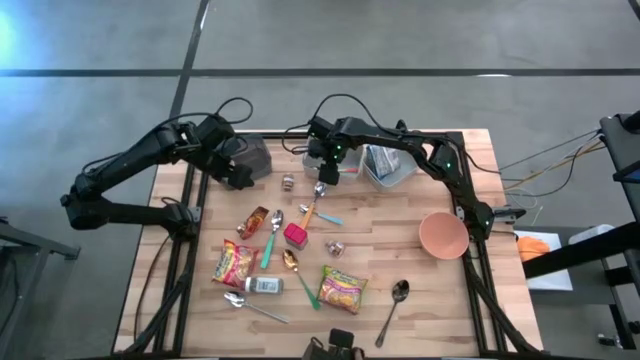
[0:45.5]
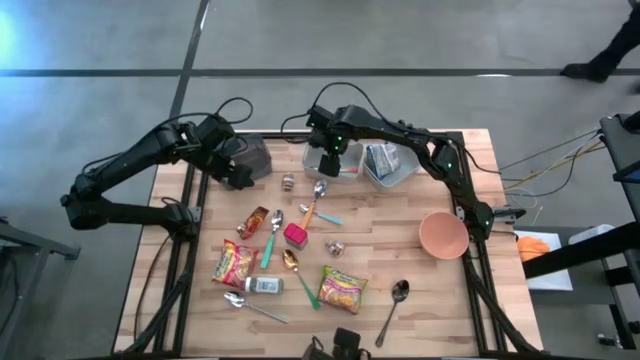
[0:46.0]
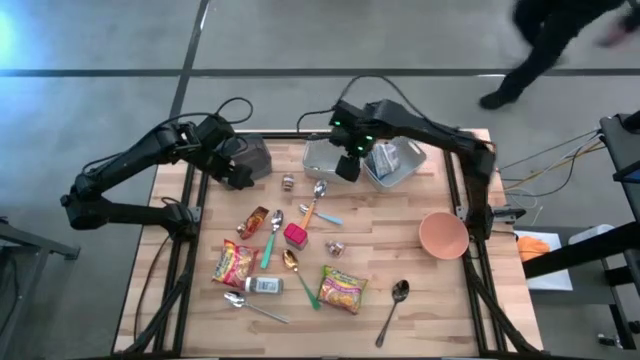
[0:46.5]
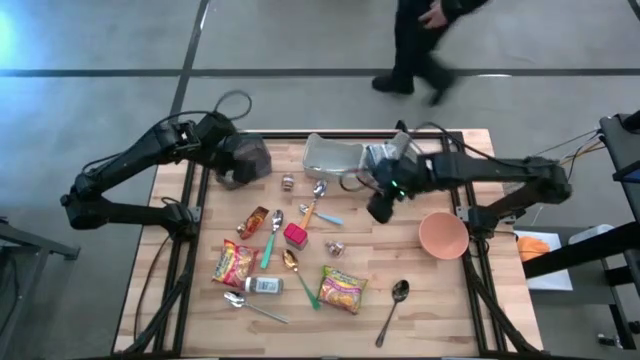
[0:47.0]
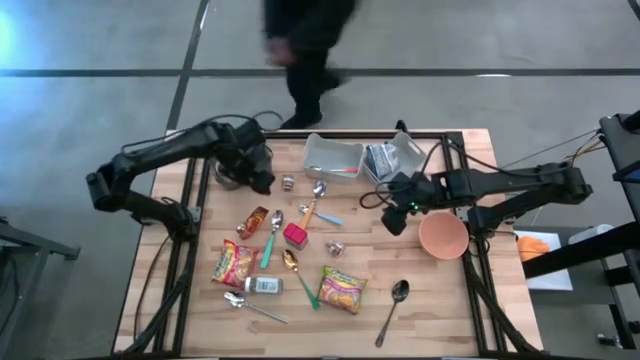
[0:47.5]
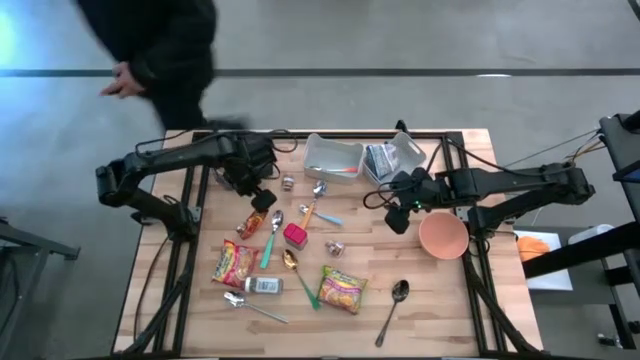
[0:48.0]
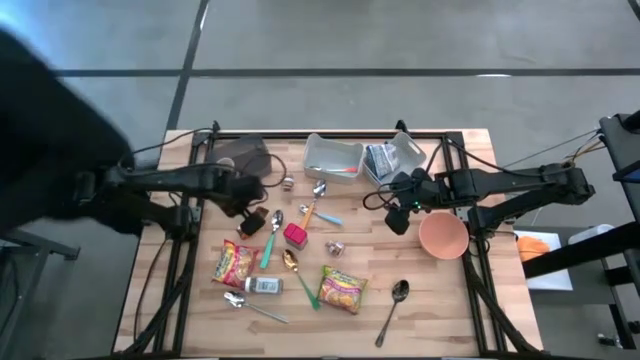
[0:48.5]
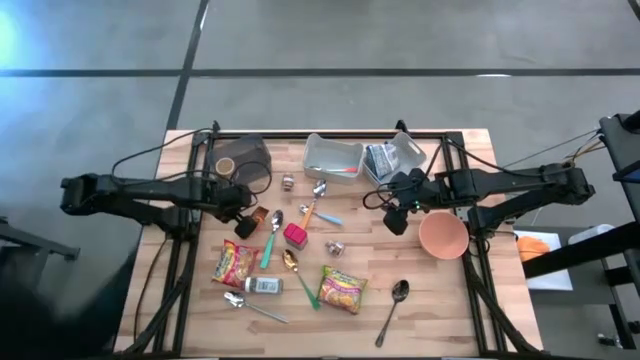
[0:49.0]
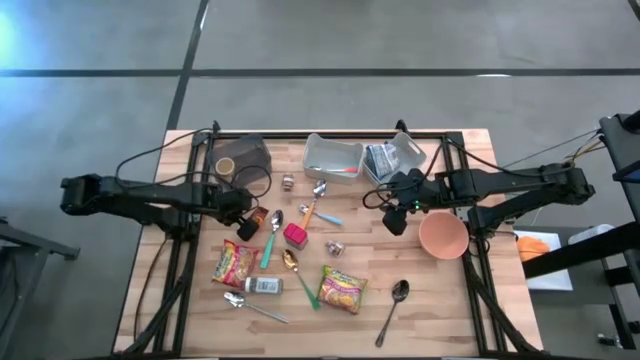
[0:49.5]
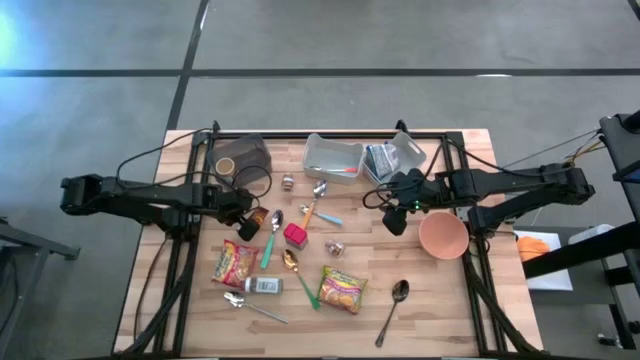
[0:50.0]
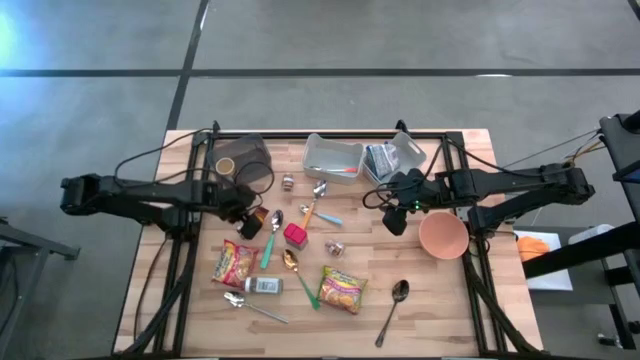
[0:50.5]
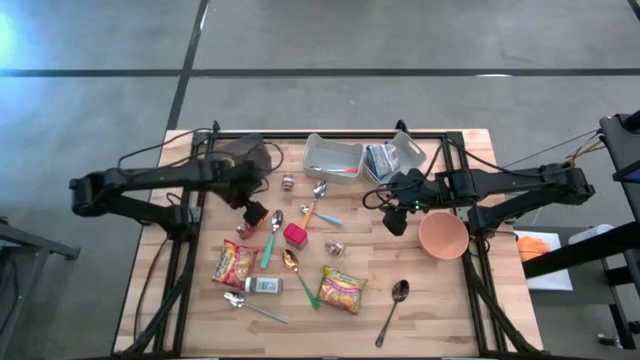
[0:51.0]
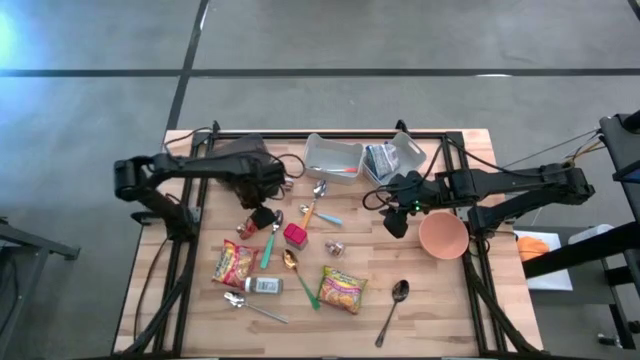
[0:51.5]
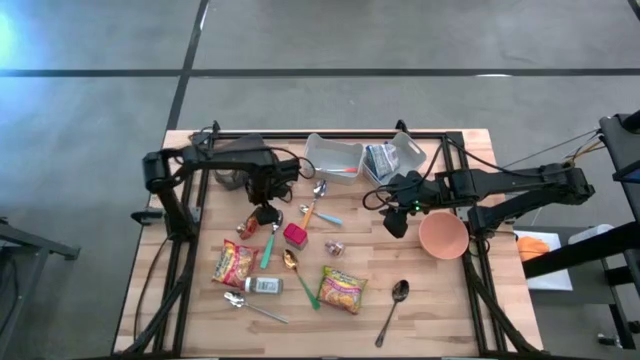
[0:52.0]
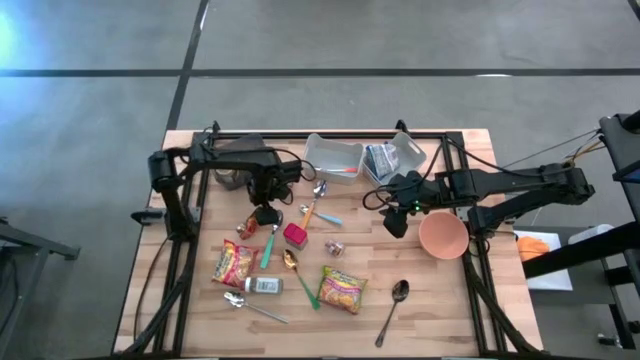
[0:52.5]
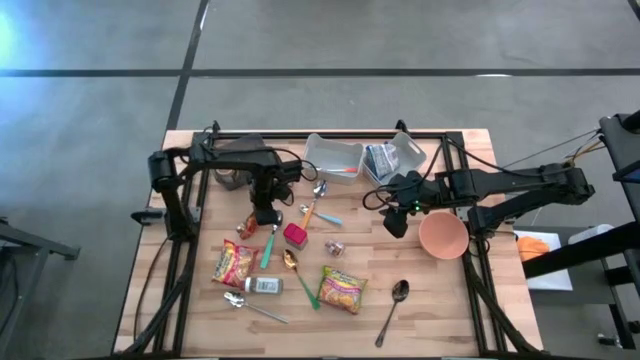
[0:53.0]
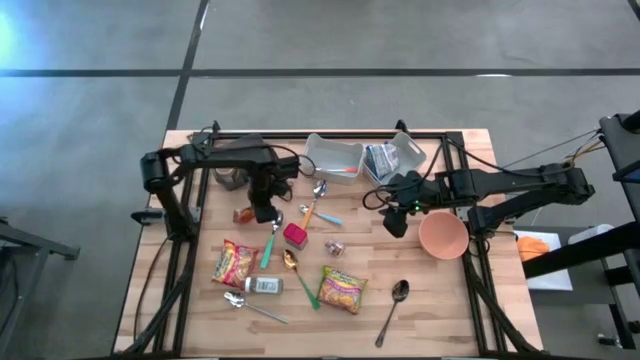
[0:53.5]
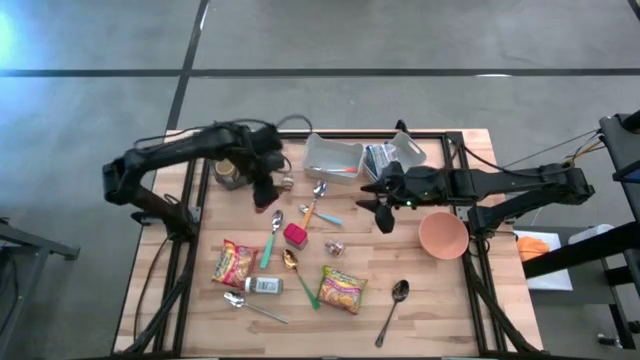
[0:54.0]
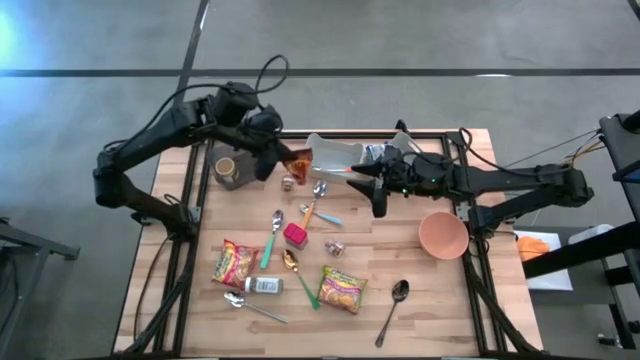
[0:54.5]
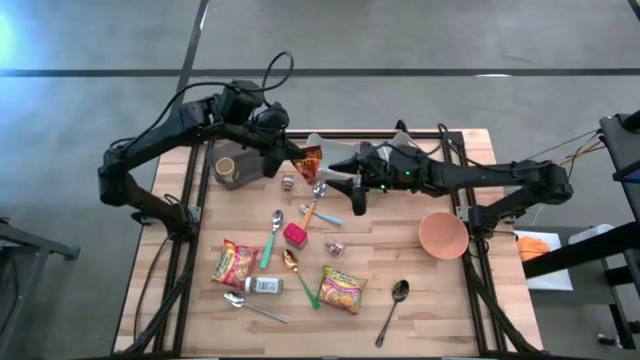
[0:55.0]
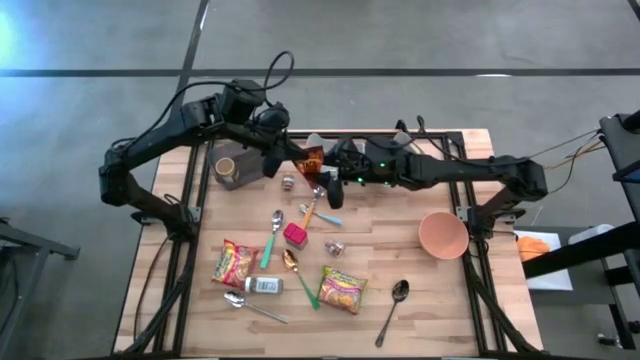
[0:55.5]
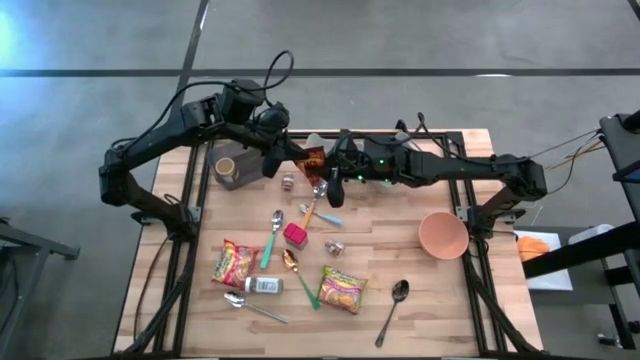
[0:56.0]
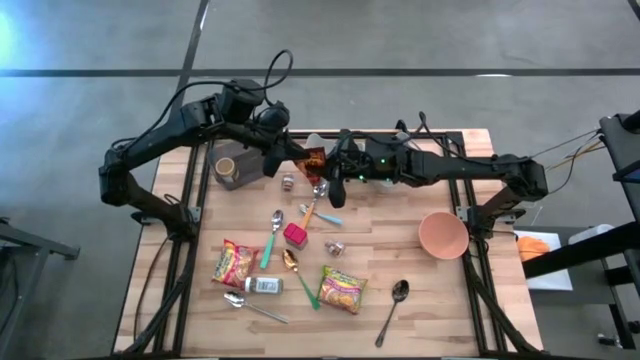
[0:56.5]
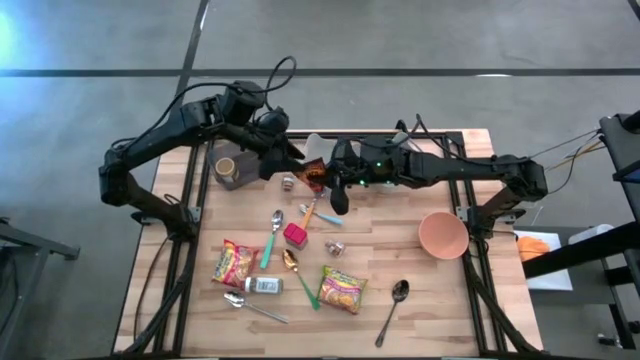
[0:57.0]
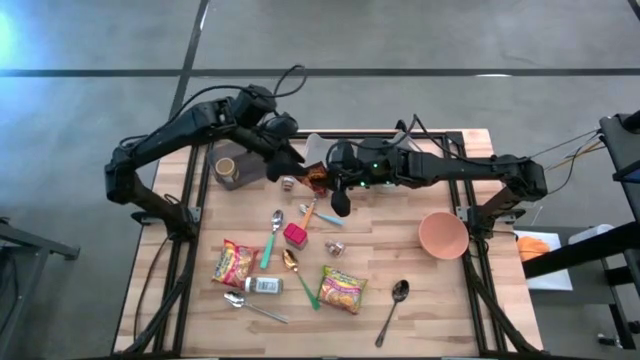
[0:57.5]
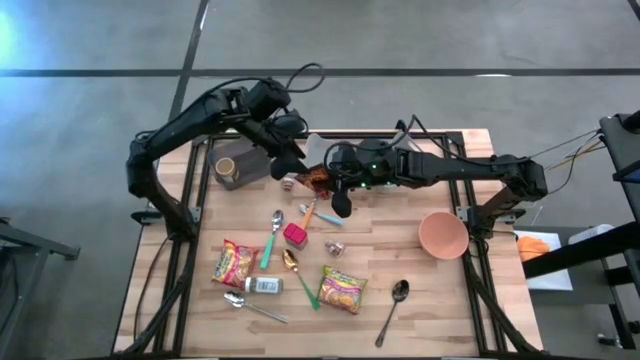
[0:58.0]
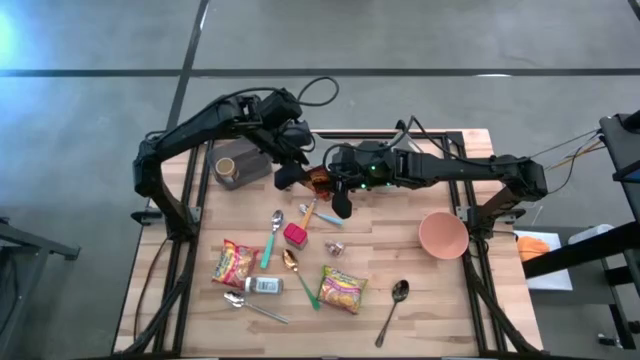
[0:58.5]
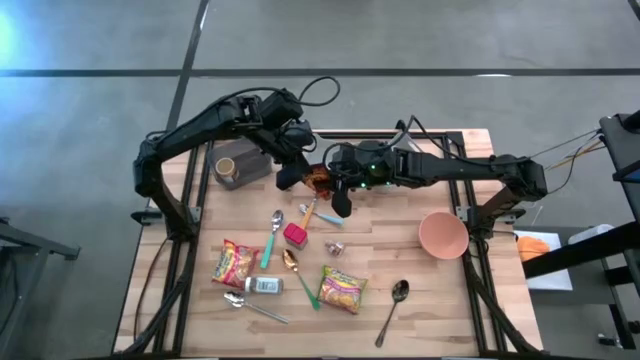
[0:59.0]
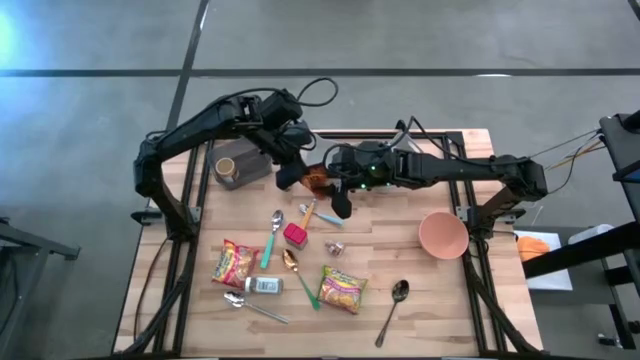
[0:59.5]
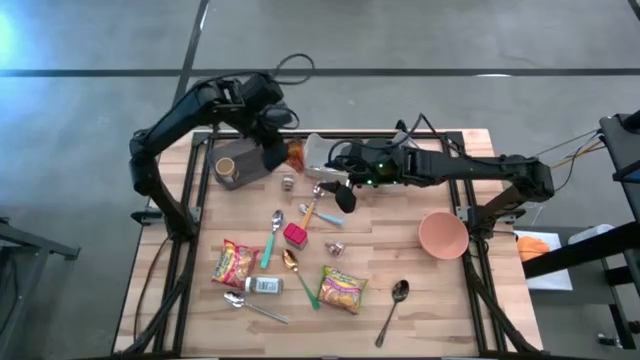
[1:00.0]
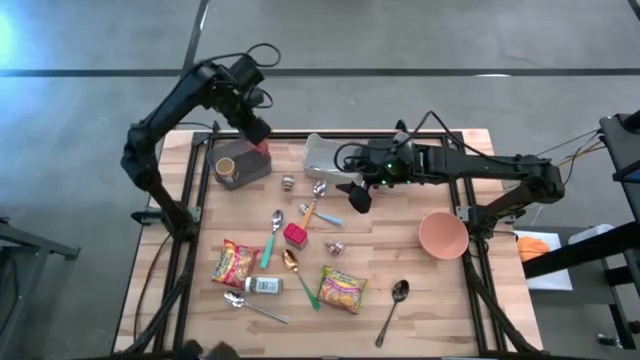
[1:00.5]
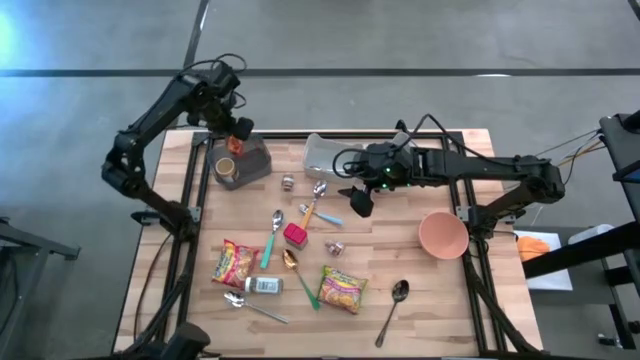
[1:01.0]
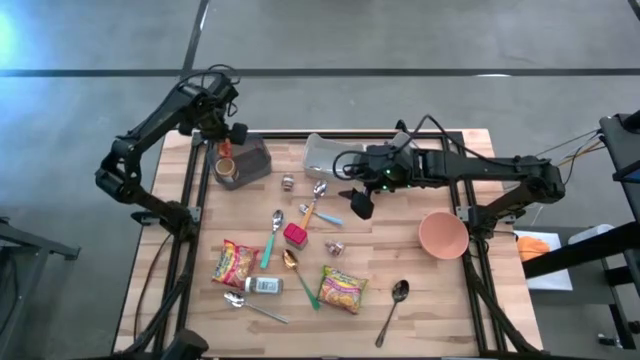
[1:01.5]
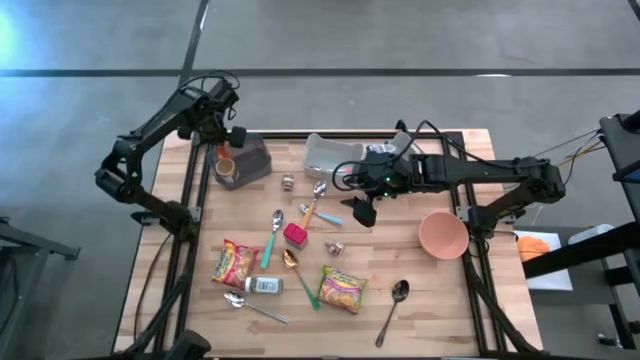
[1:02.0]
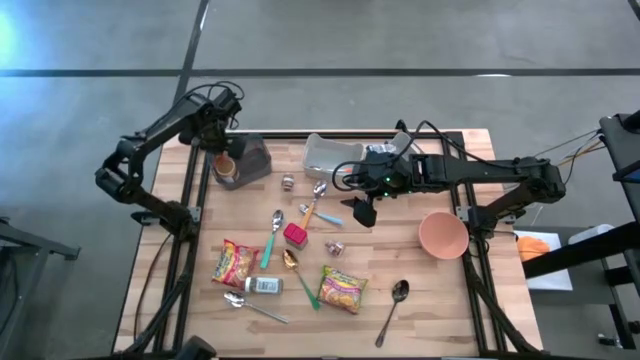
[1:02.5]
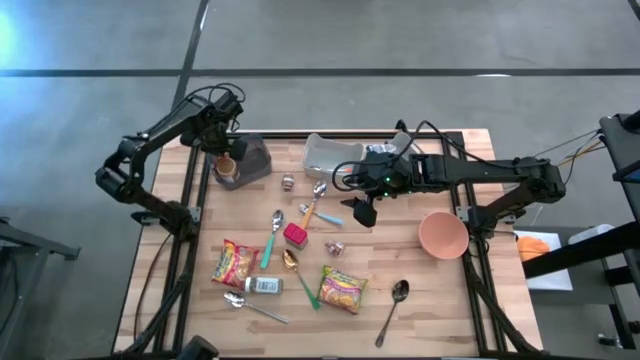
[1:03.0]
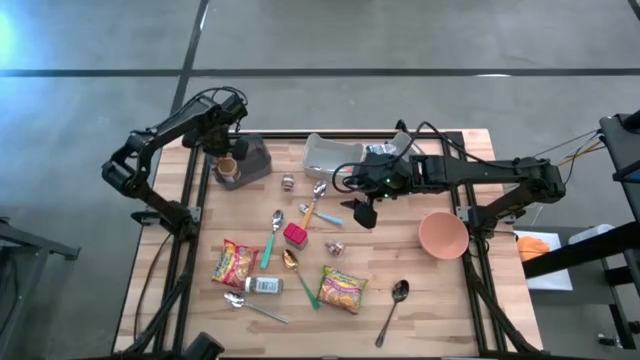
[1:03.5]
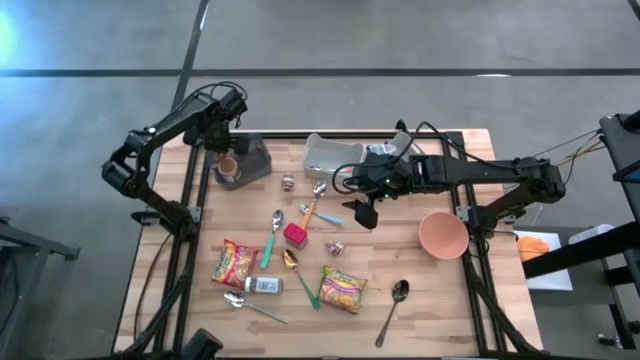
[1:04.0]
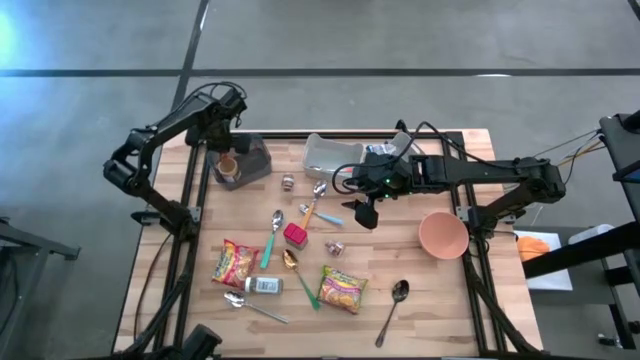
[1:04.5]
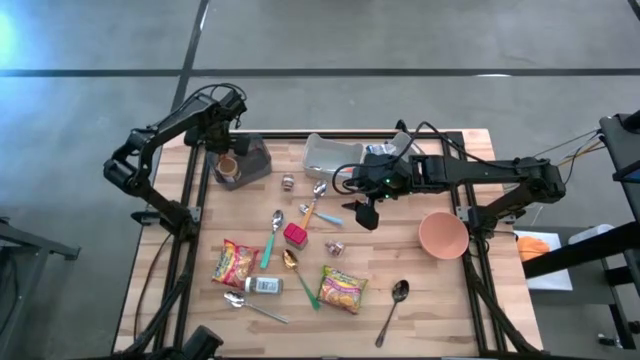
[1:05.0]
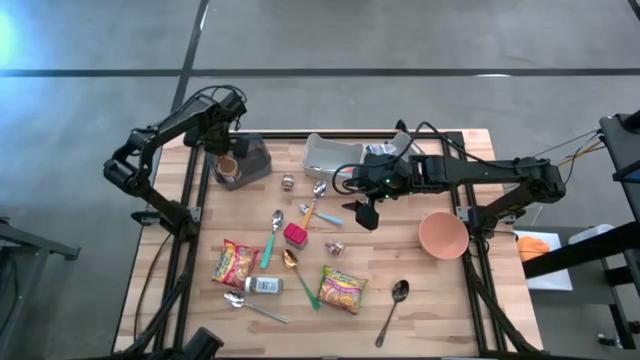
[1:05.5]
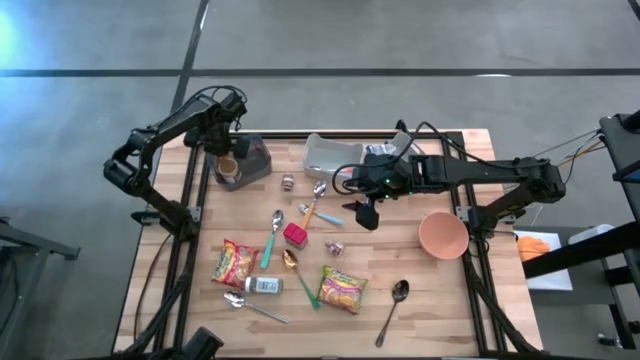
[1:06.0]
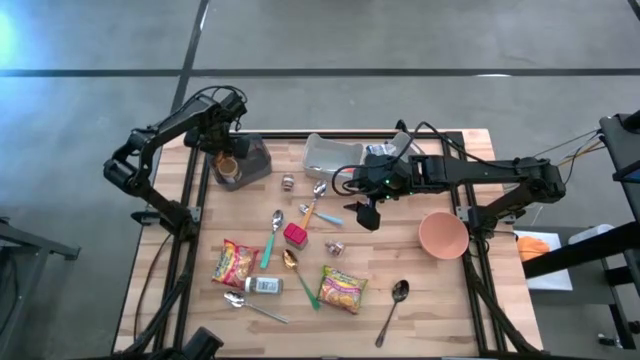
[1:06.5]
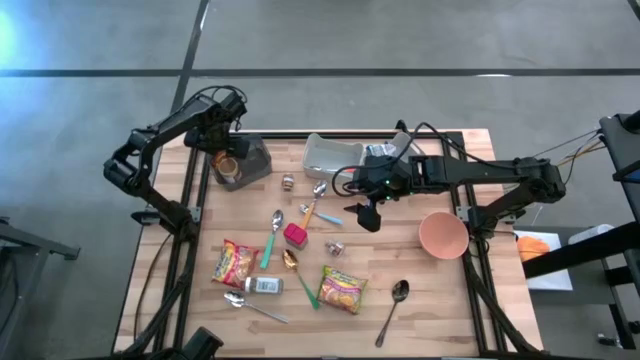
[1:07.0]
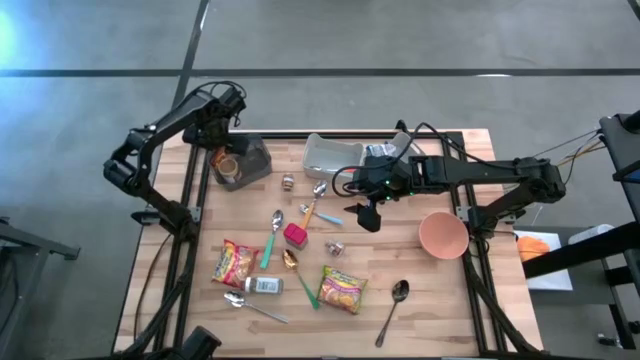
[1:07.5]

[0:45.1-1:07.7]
Put the orange seasoning bag into the black bin
